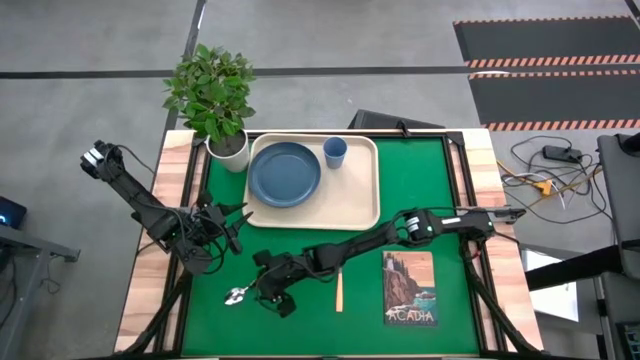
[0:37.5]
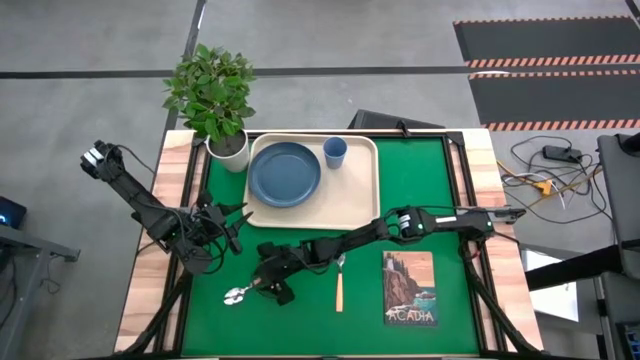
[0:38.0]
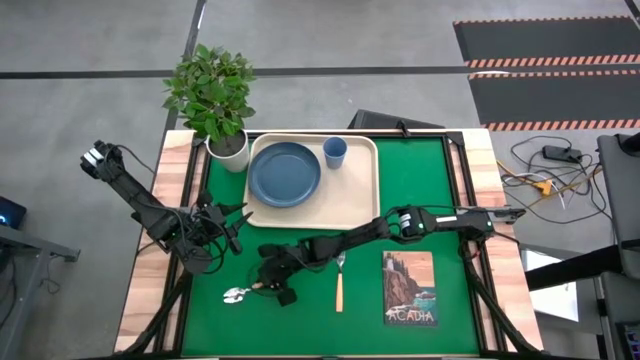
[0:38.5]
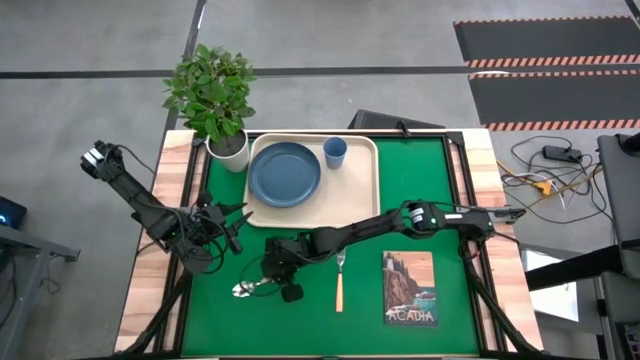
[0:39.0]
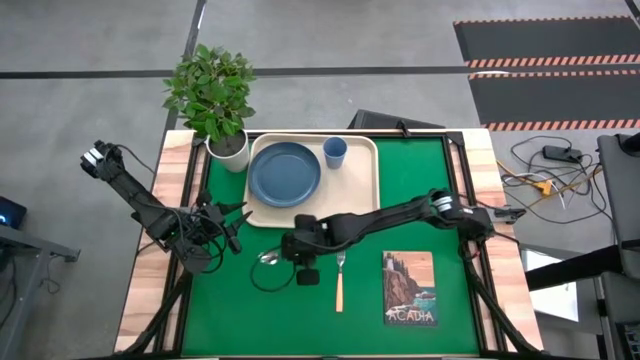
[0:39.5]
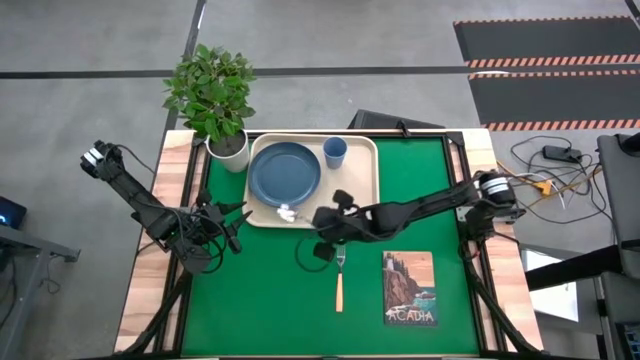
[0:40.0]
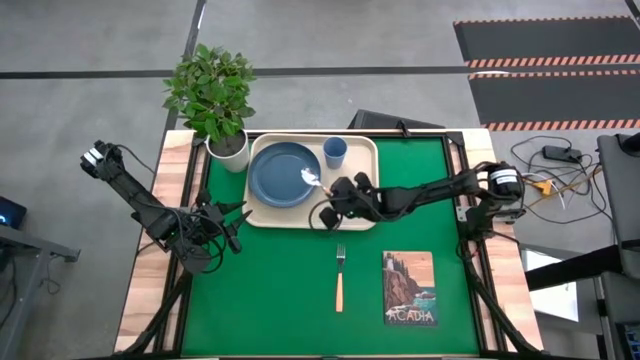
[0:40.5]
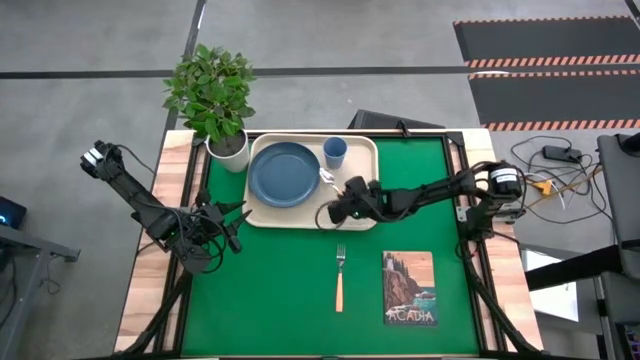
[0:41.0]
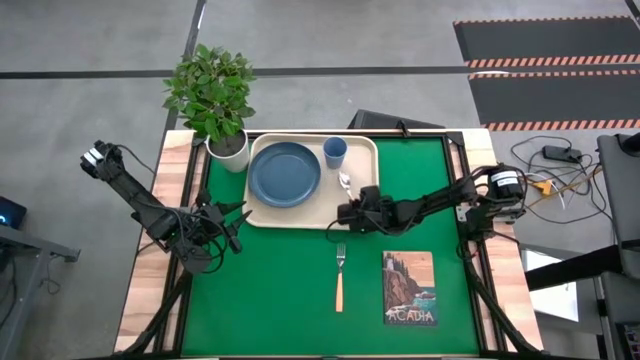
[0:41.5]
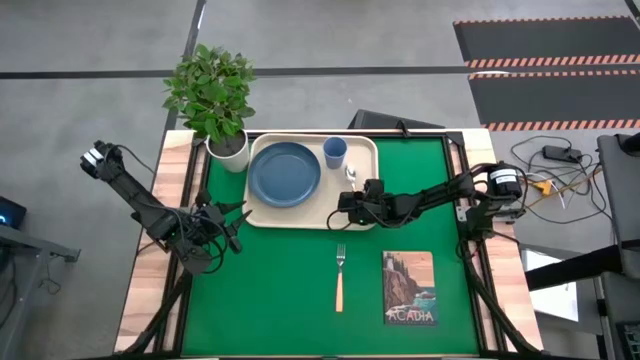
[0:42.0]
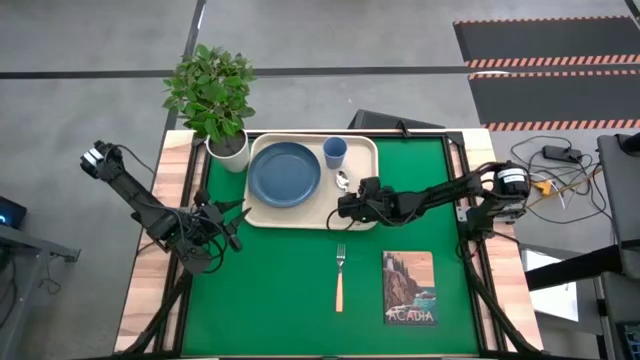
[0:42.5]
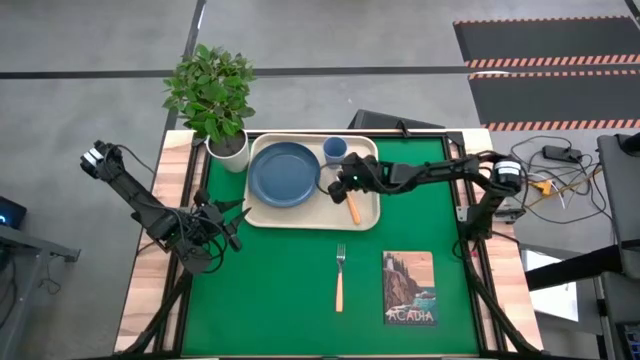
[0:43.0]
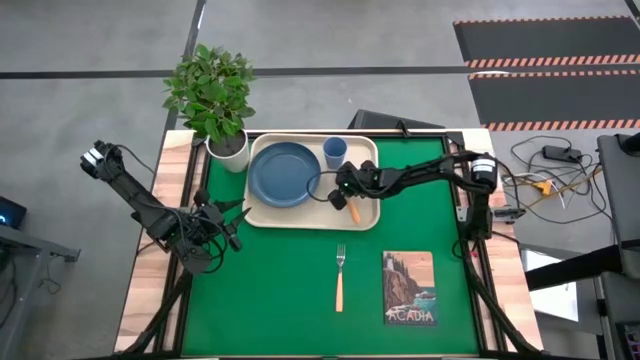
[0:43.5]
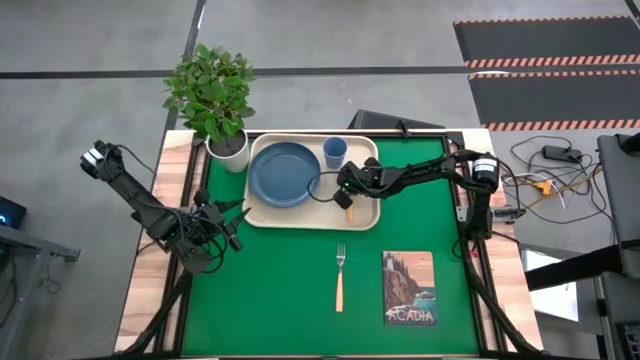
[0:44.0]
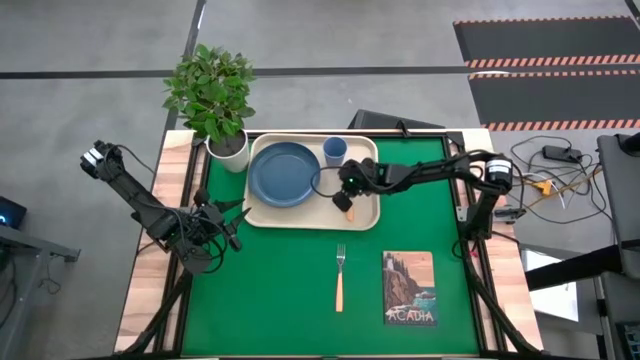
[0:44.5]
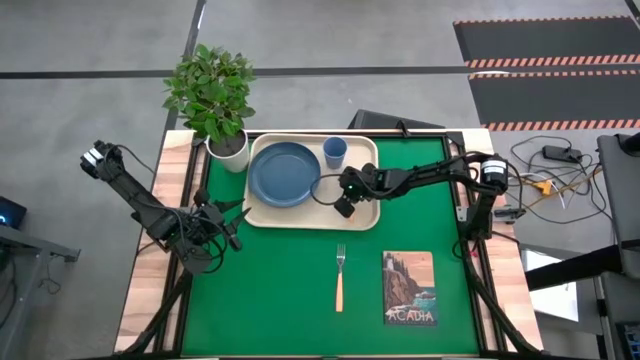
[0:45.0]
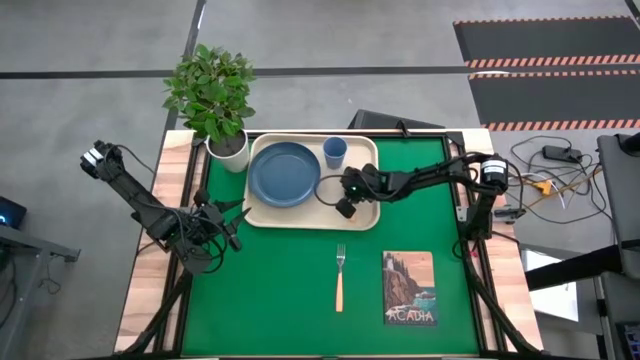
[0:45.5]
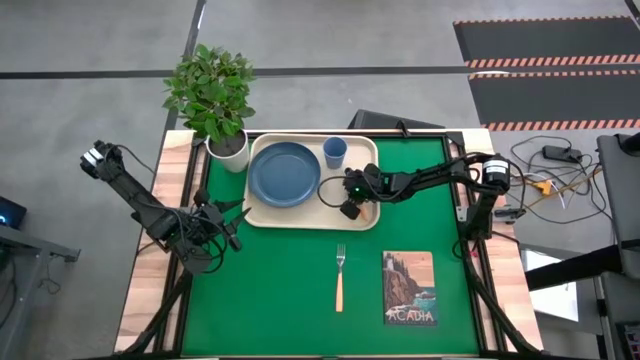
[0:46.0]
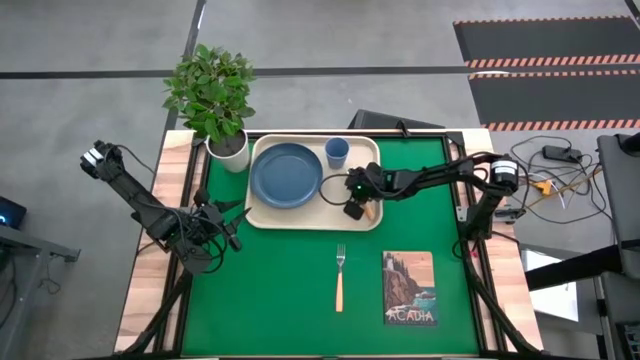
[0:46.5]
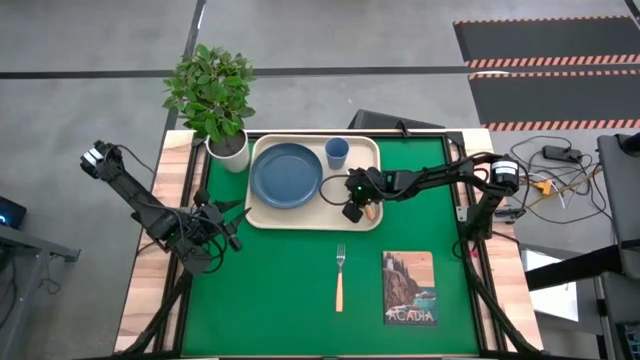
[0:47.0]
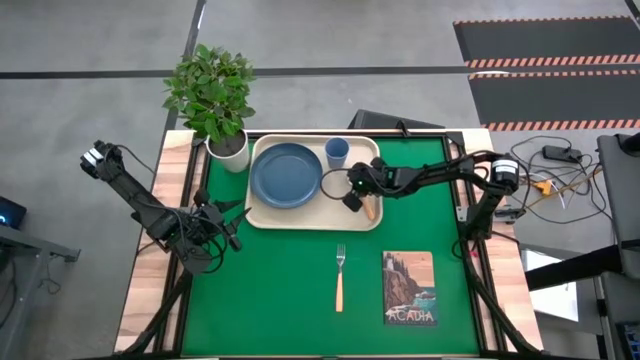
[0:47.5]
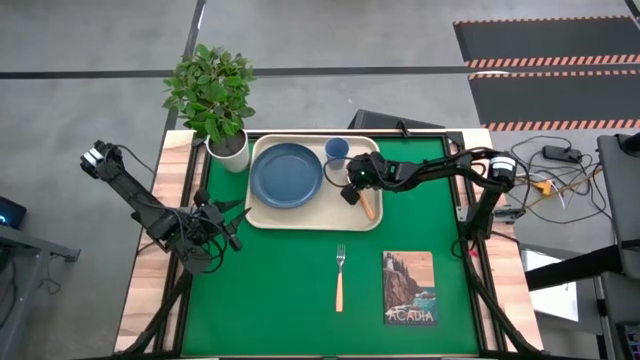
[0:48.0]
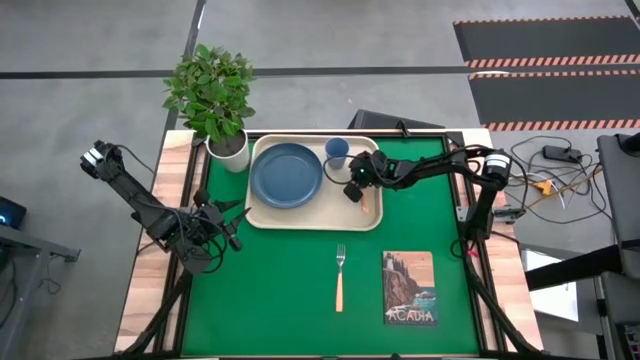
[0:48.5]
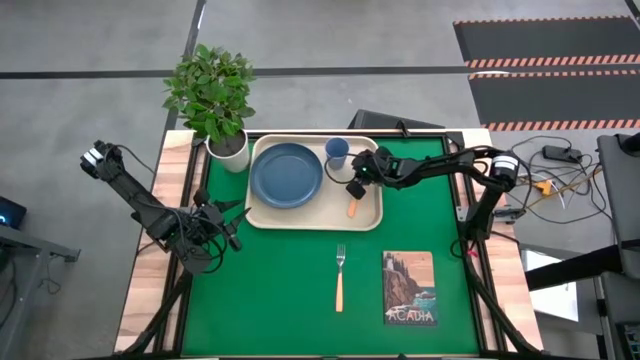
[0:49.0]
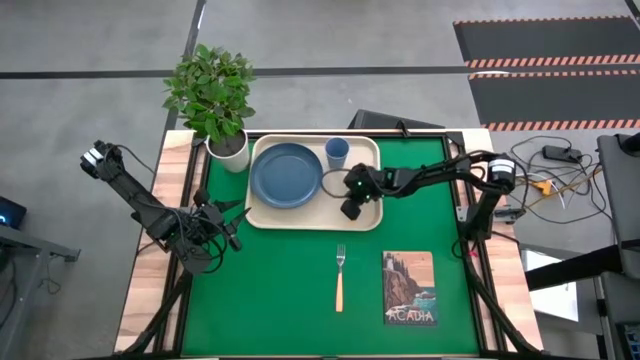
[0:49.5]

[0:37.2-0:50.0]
Task: Pick and place plate/cup/fork/spoon on tray
Put the yellow spoon on the white serving tray to the right of the blue plate

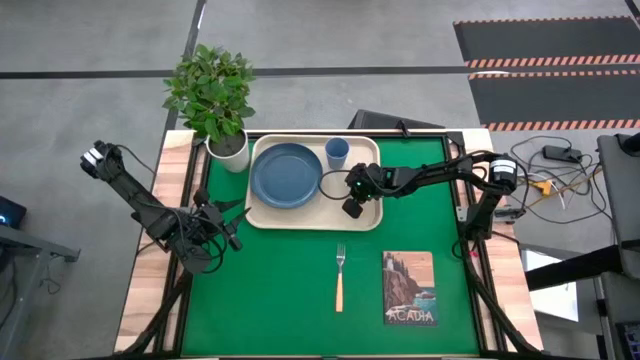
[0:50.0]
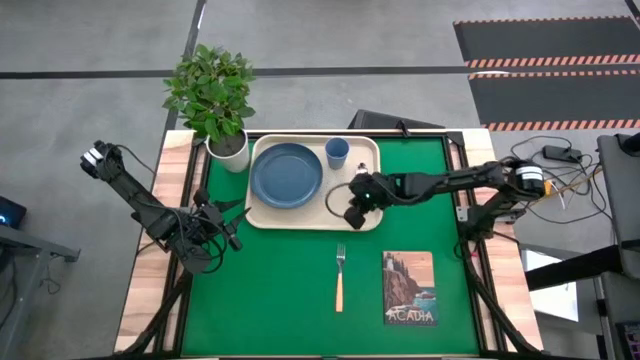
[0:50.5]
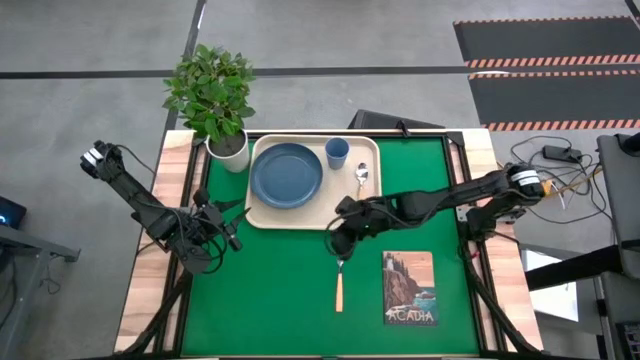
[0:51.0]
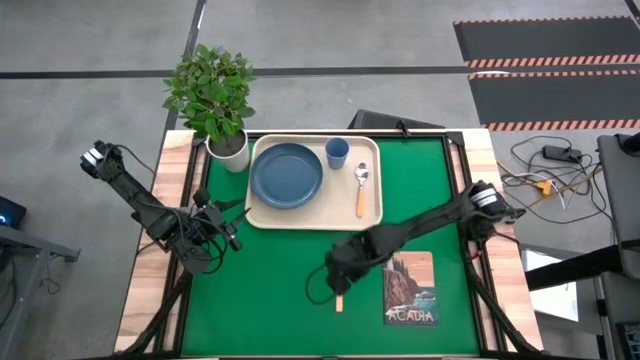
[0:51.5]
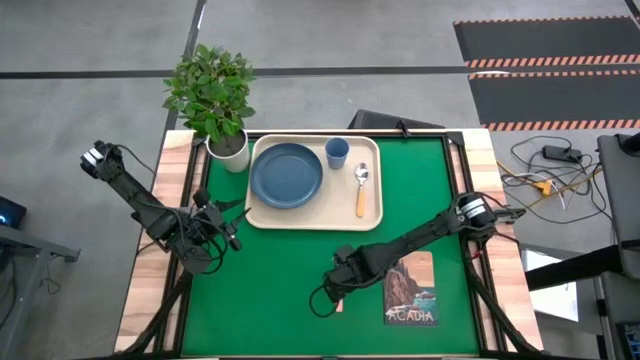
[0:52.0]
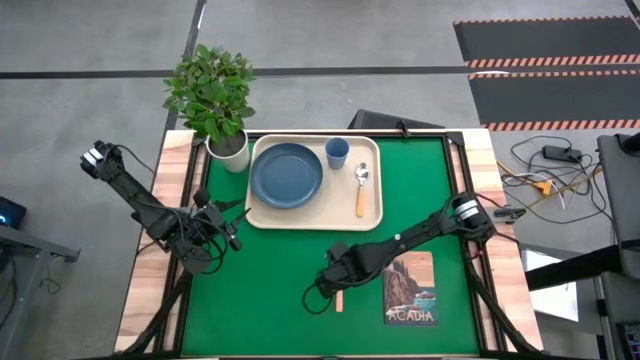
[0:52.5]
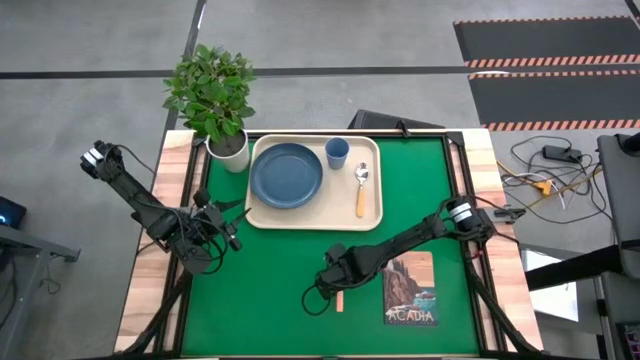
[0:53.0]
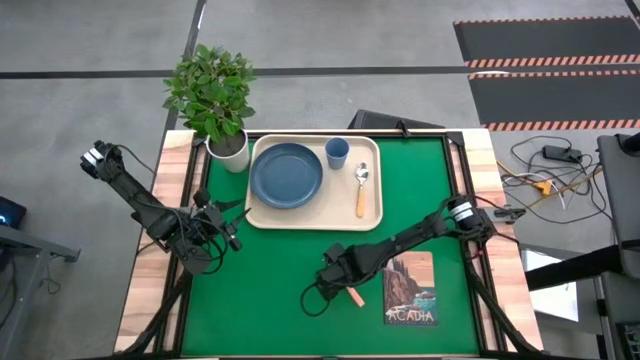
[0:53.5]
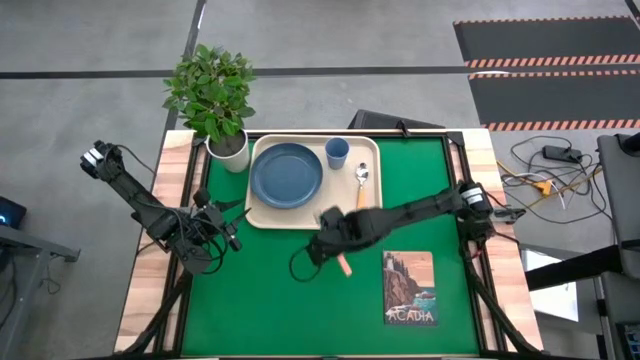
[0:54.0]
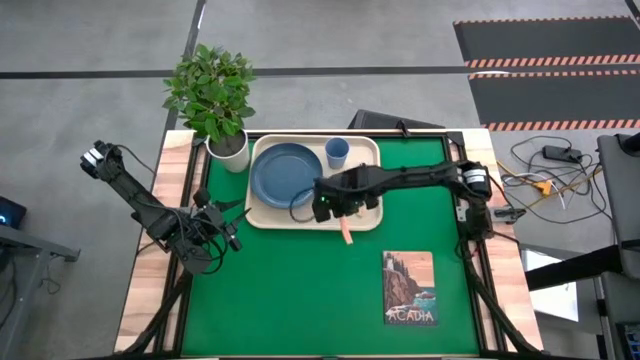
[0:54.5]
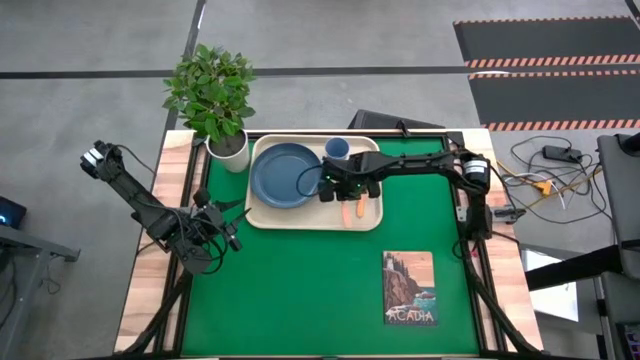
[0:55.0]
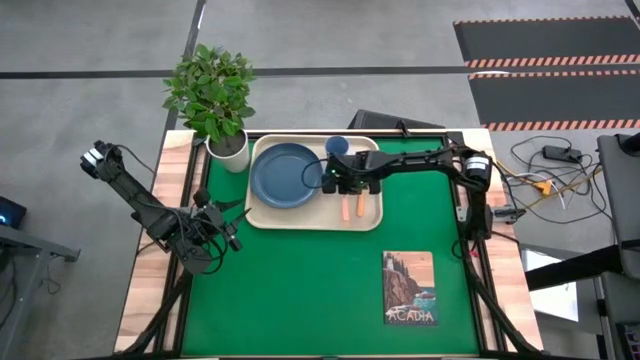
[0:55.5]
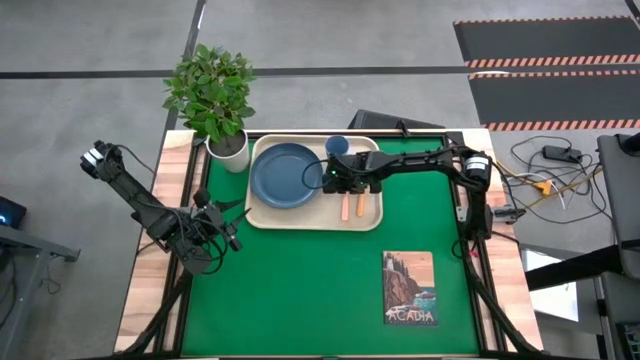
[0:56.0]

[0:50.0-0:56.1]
Put the yellow fork on the white serving tray to the left of the yellow spoon

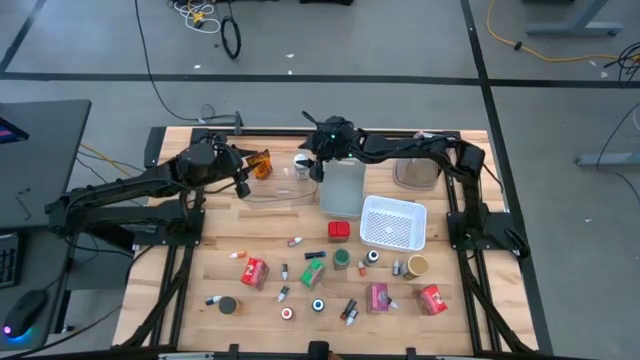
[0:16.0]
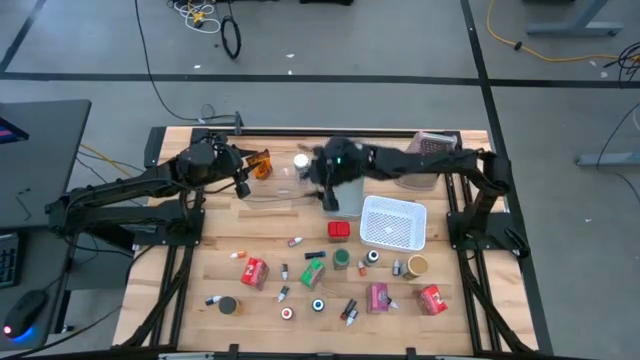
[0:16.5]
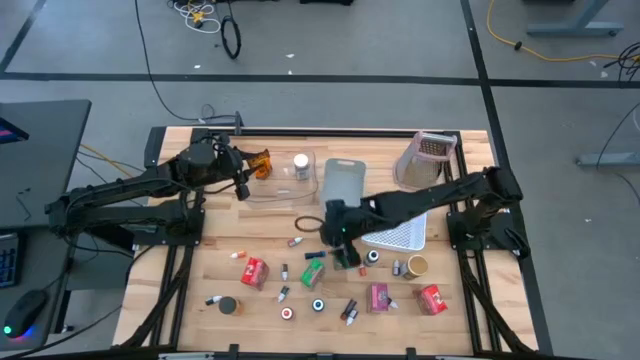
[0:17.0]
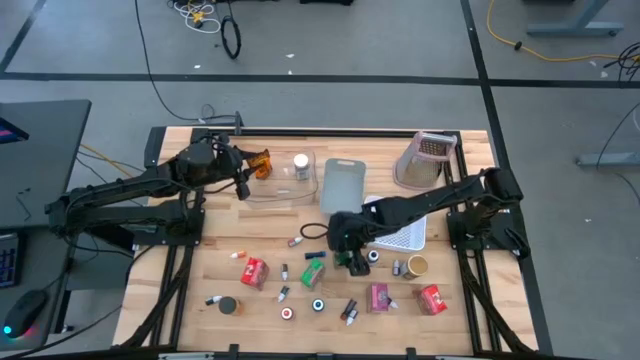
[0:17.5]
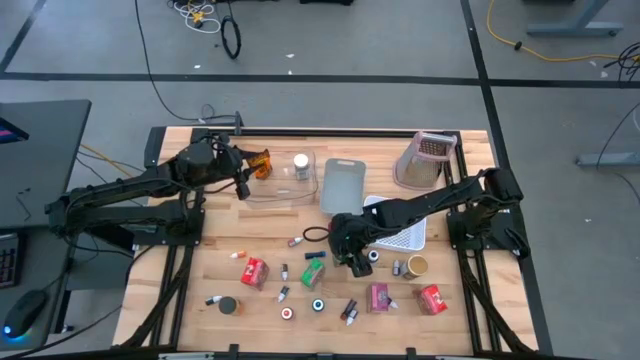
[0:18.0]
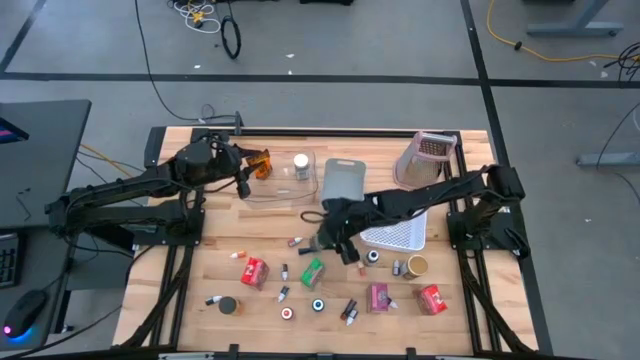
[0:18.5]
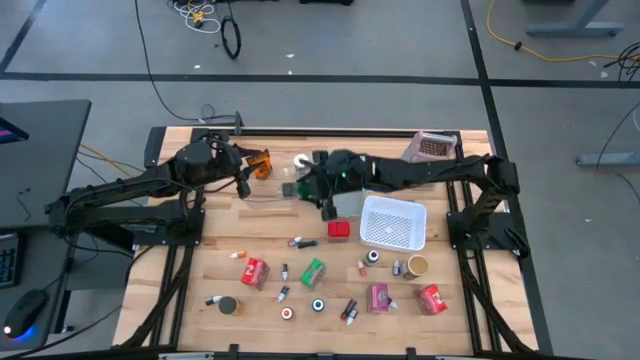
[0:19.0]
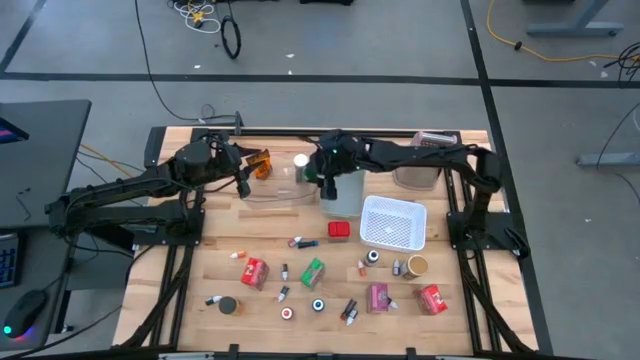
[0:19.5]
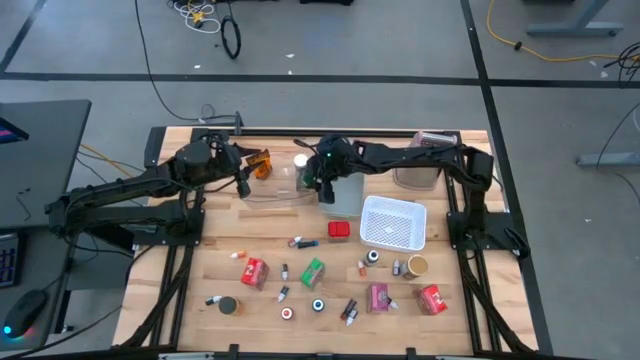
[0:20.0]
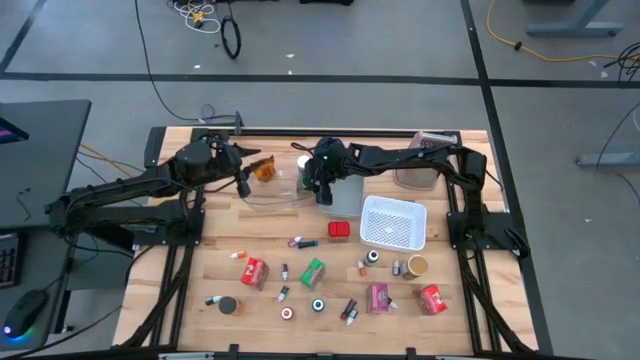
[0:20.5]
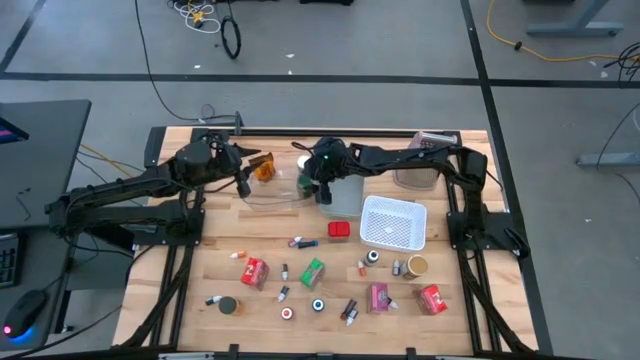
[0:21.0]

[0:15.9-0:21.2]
Task: Pick & Place Kitchen Items
Put the green seasoning bottle into the transparent bin
